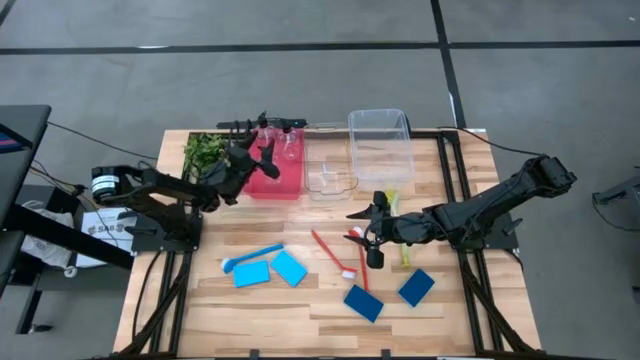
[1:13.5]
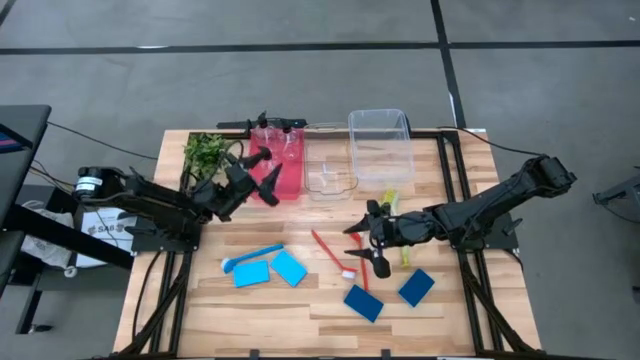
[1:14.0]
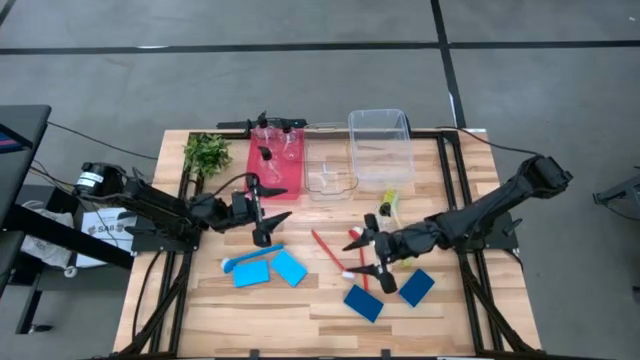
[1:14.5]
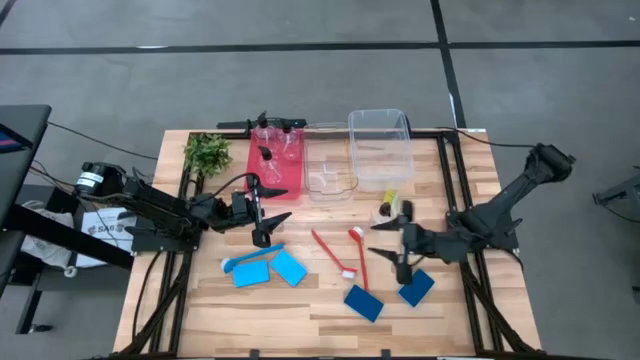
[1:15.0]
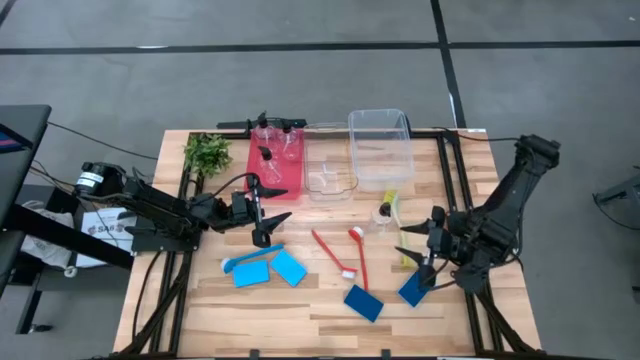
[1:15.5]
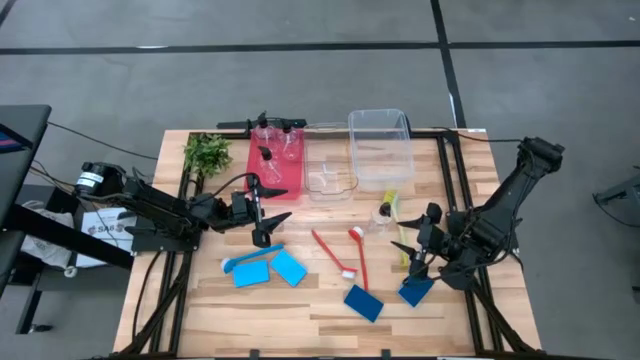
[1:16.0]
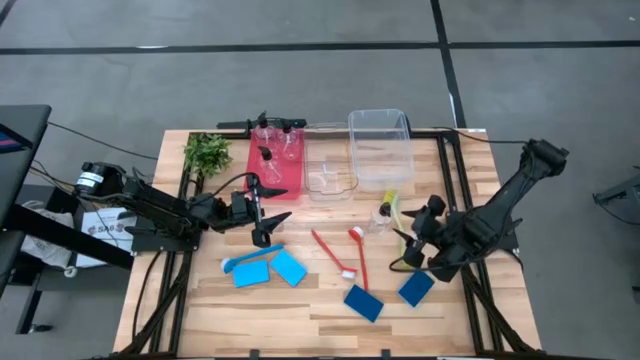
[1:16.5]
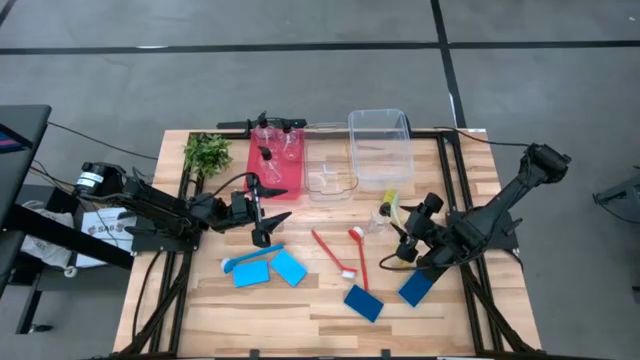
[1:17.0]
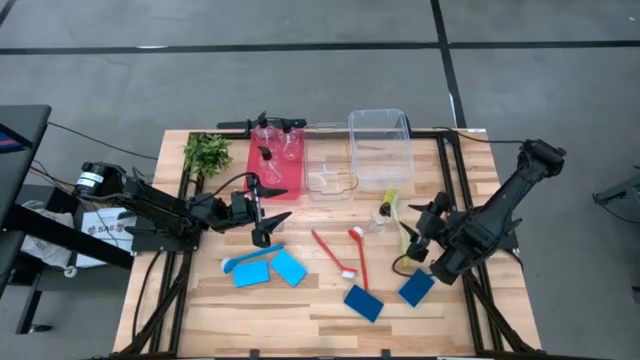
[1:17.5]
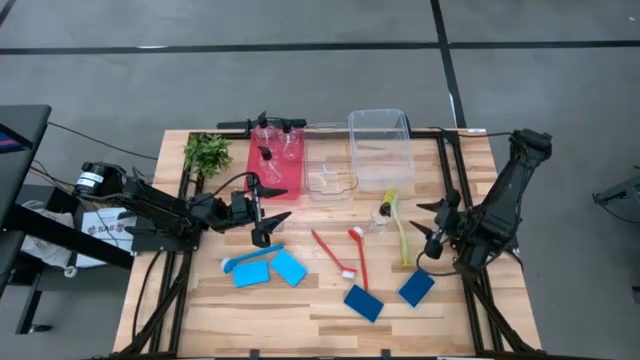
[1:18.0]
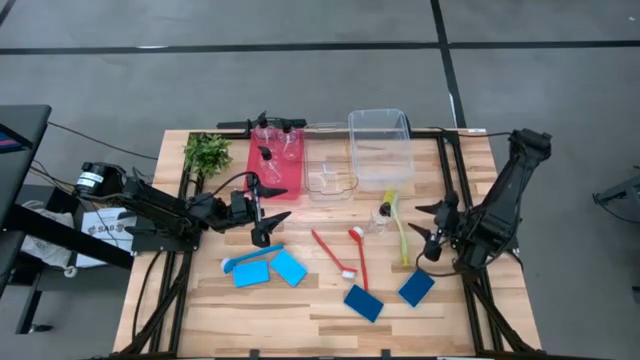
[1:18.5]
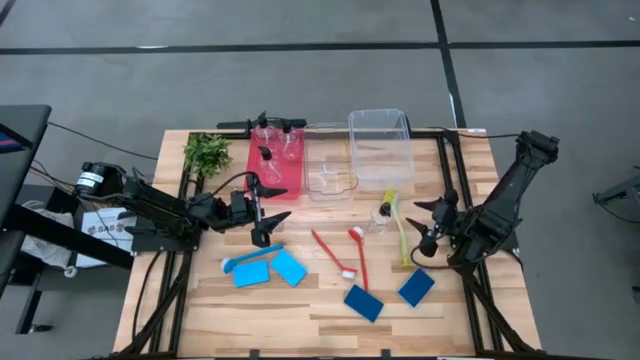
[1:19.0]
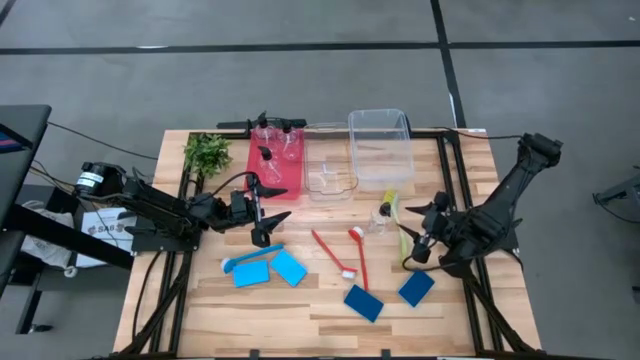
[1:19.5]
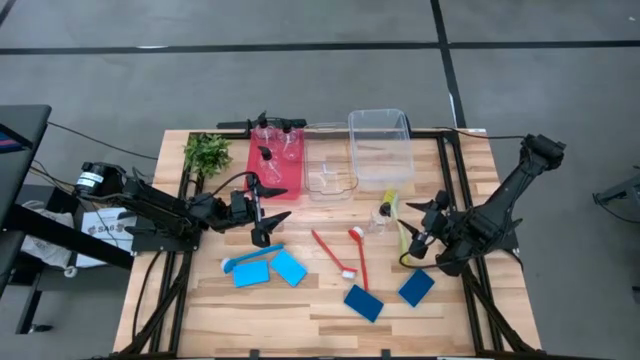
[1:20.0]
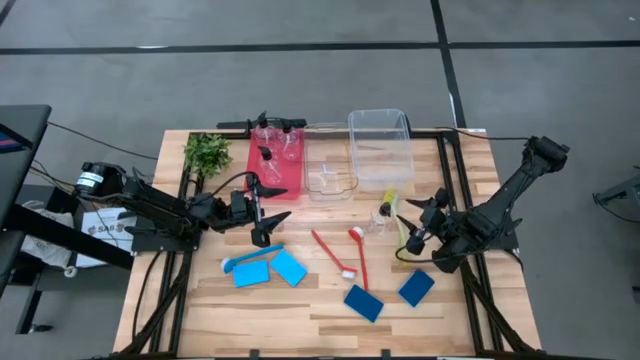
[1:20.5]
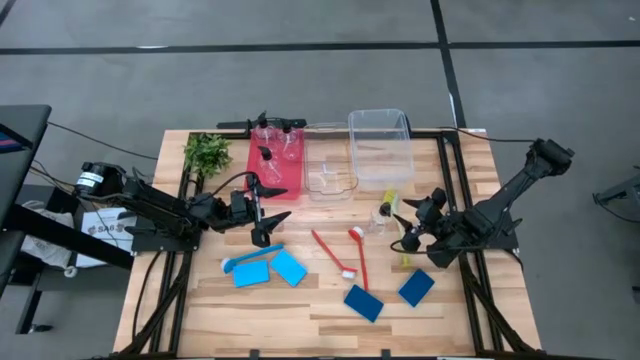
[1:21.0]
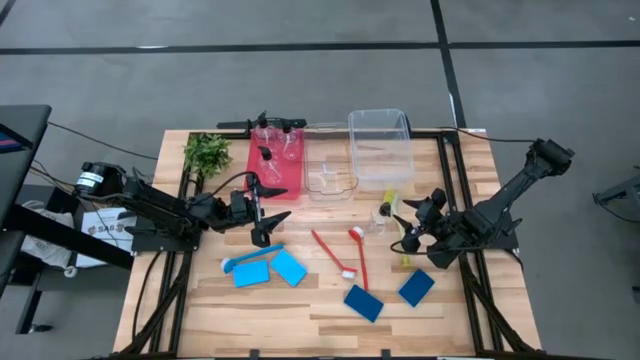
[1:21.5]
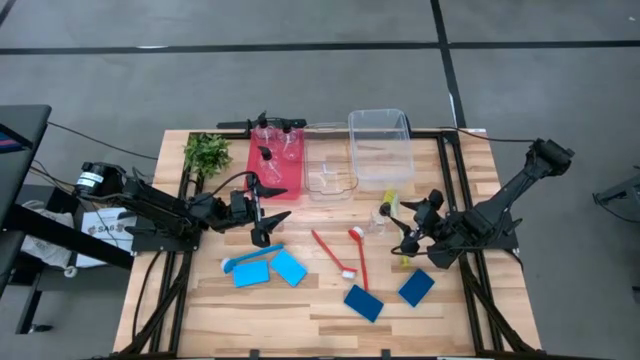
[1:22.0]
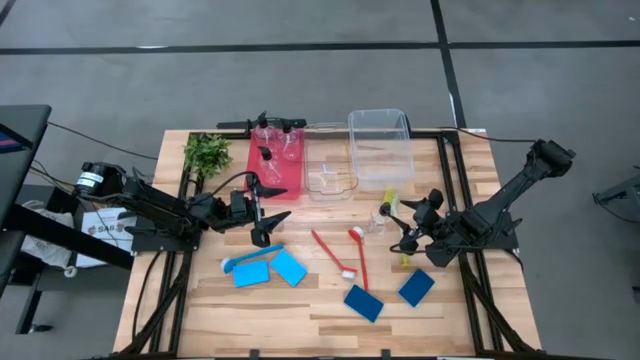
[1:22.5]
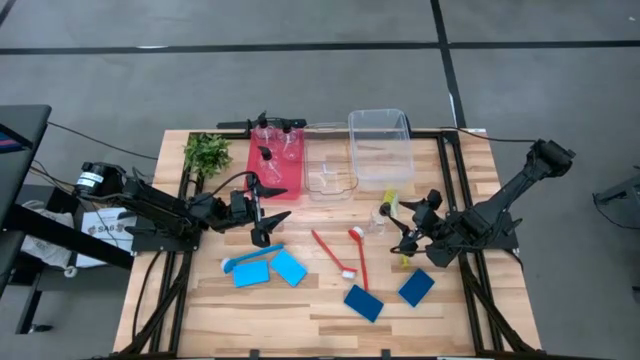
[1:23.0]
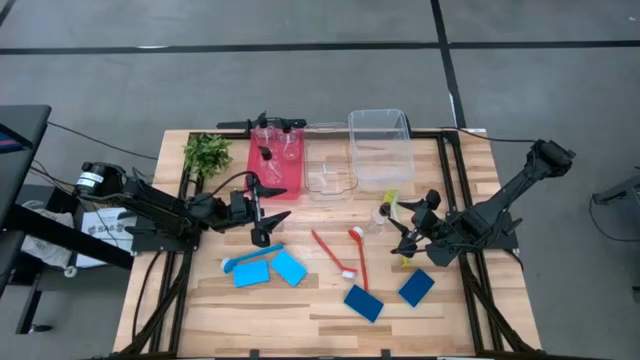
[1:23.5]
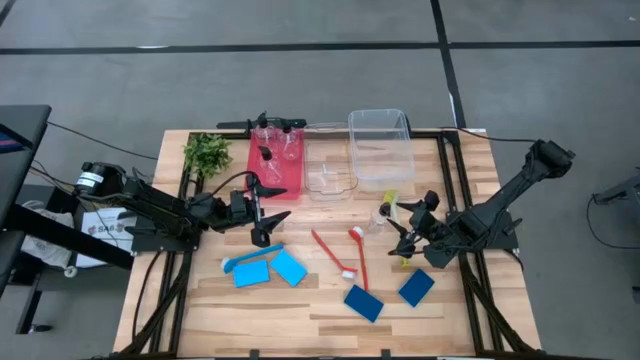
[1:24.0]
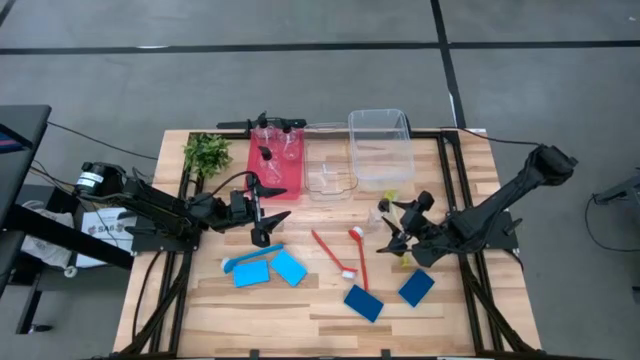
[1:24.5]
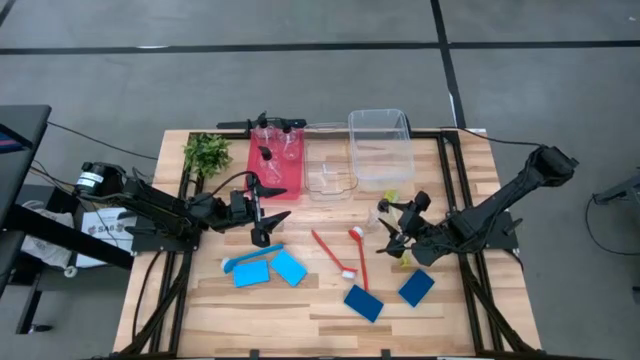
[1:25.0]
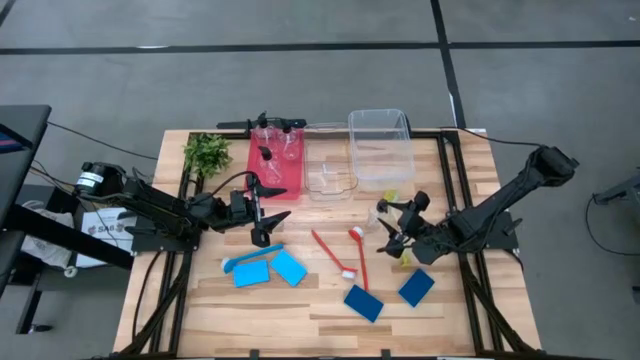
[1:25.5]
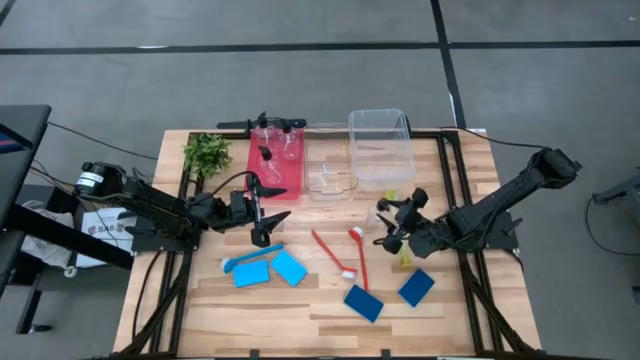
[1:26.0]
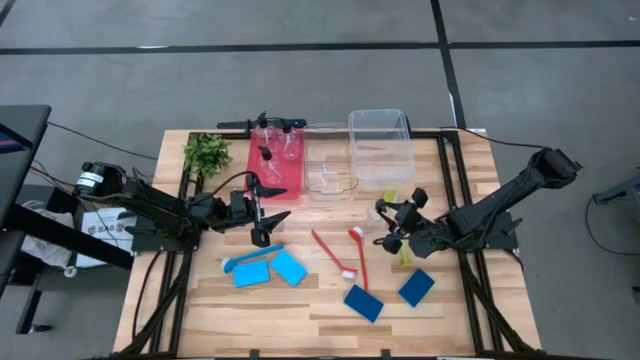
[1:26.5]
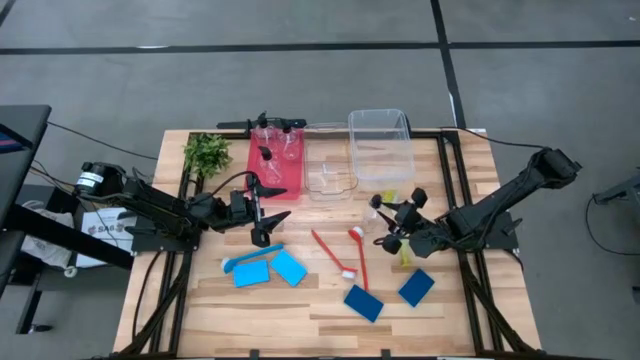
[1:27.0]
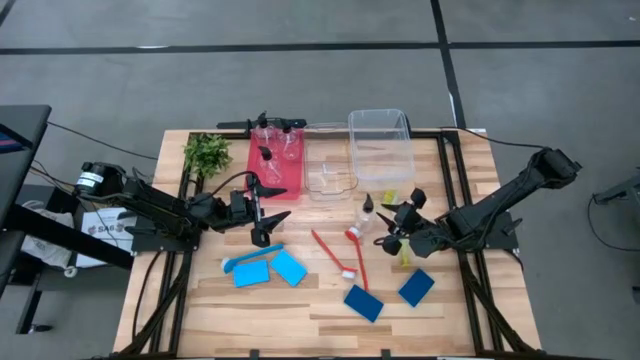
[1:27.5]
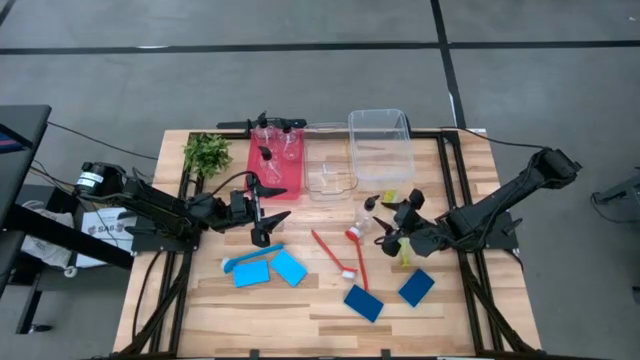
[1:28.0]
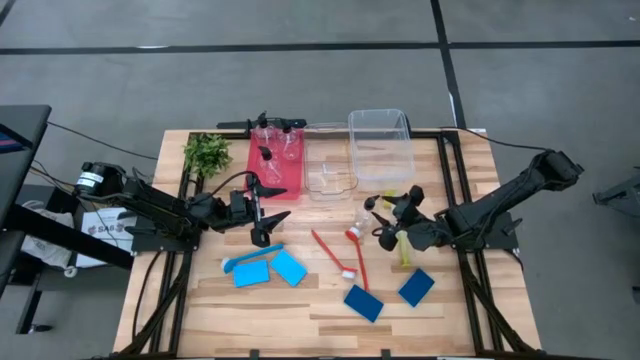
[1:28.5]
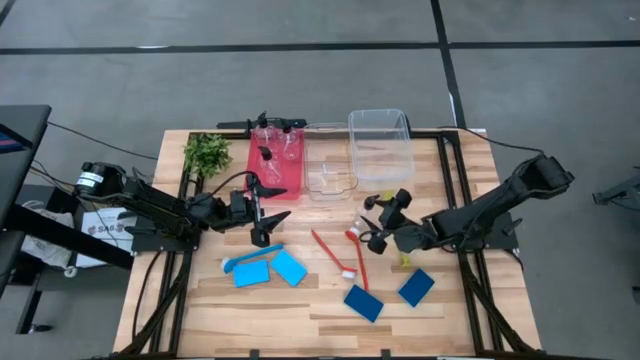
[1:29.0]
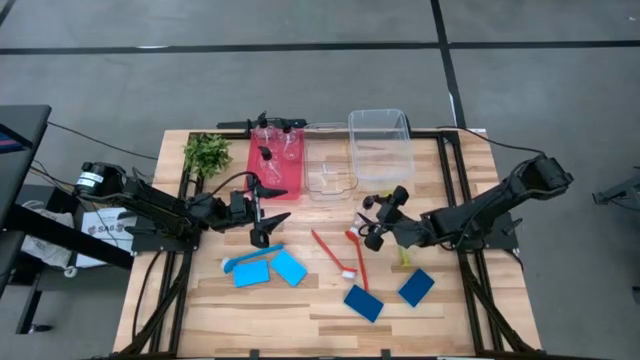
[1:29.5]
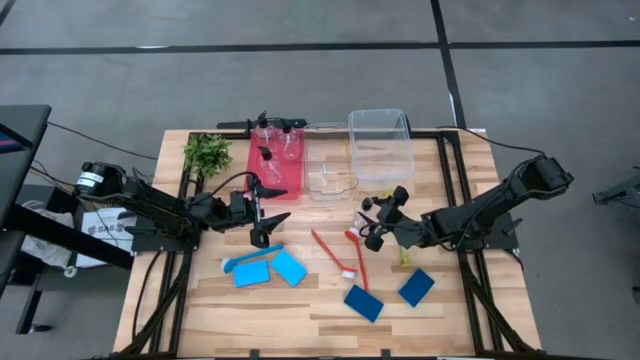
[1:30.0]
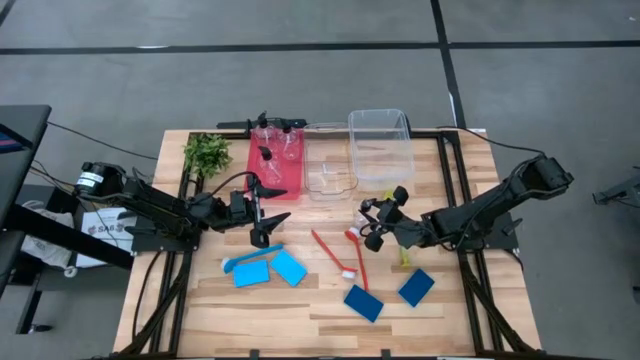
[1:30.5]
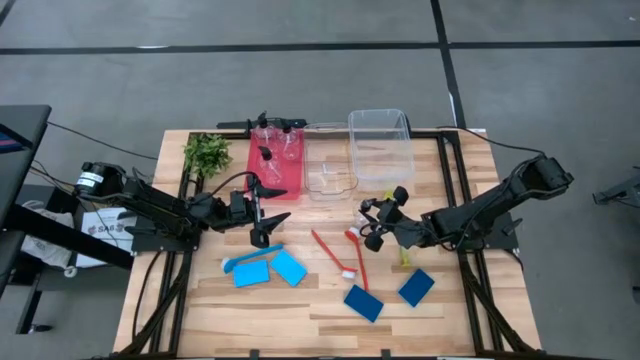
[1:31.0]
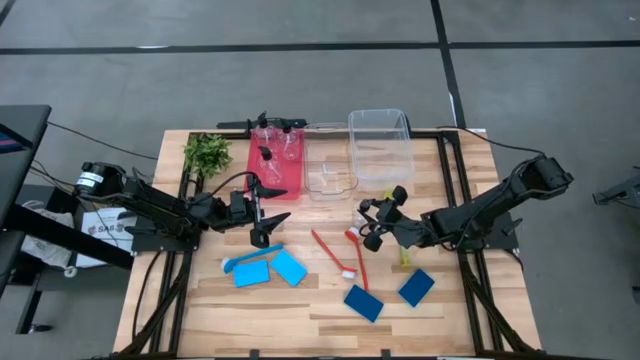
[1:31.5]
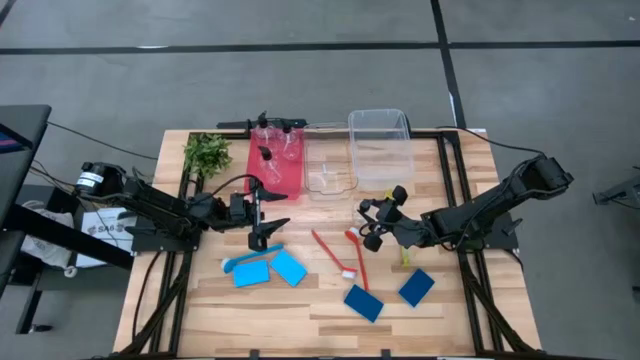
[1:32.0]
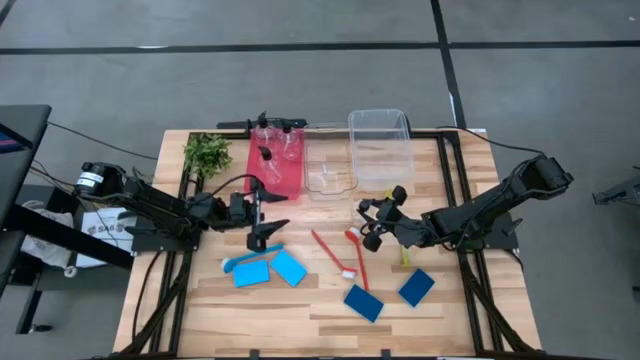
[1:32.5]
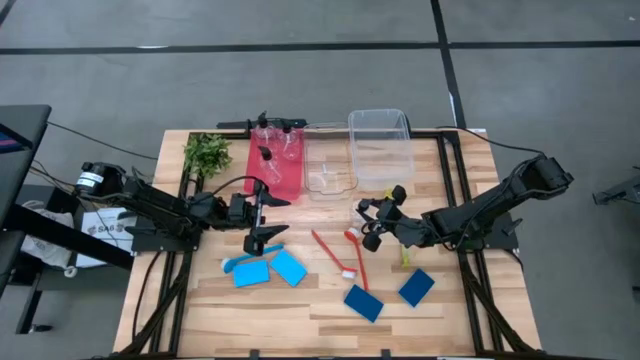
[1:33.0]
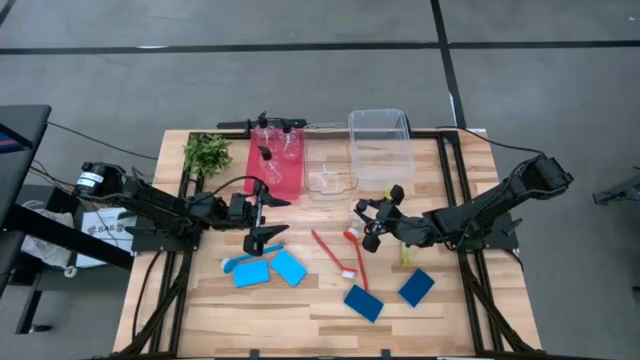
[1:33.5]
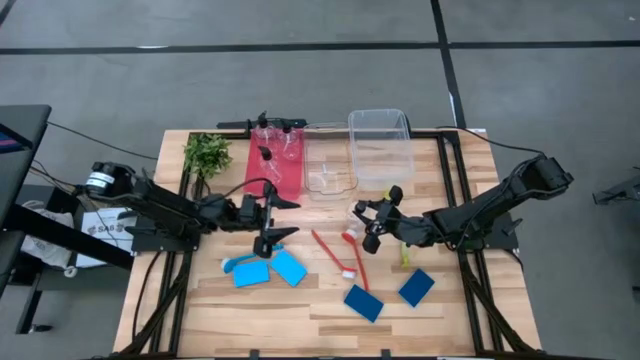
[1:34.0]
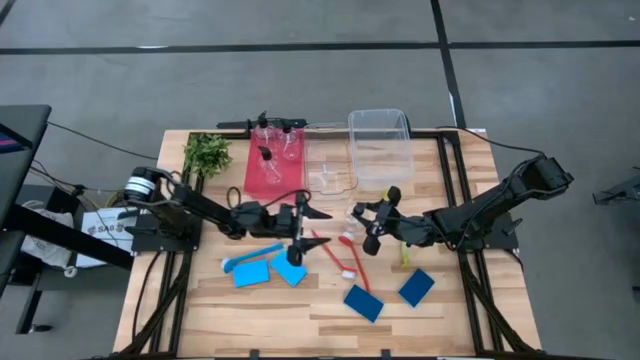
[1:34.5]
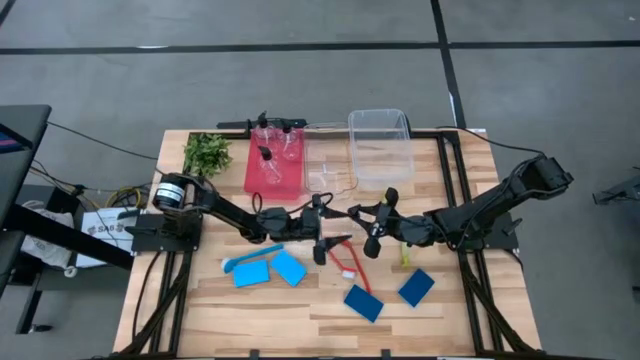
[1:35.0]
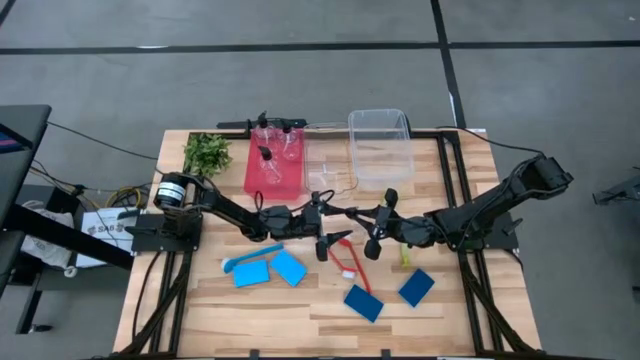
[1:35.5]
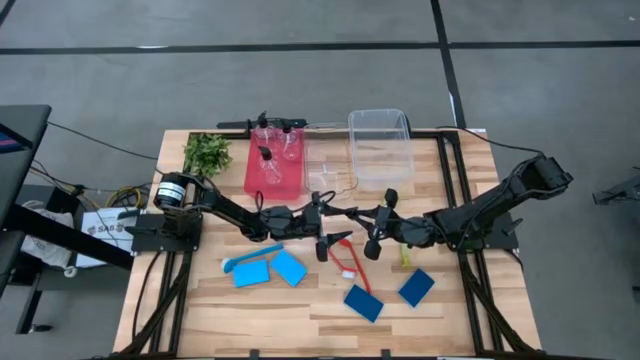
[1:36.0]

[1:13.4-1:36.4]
Task: Pick & Place Kitchen Sink Supplies
Put the transparent soap dispenser into the red bin
